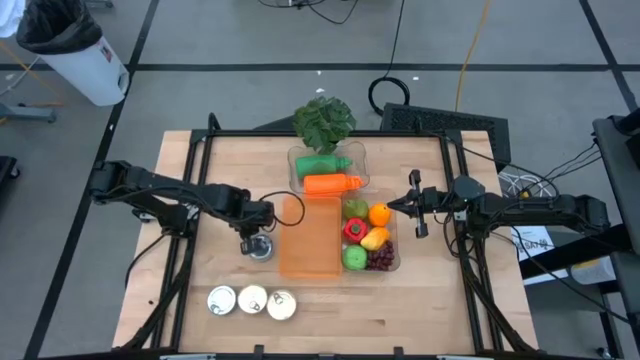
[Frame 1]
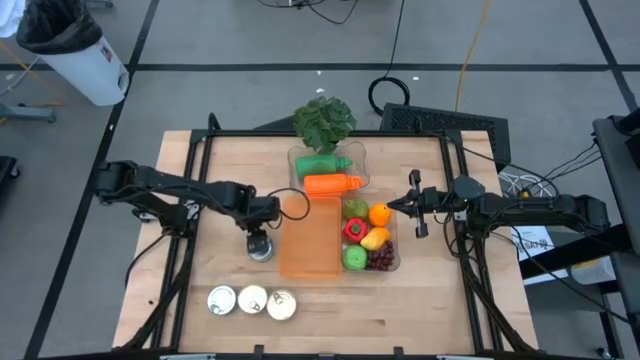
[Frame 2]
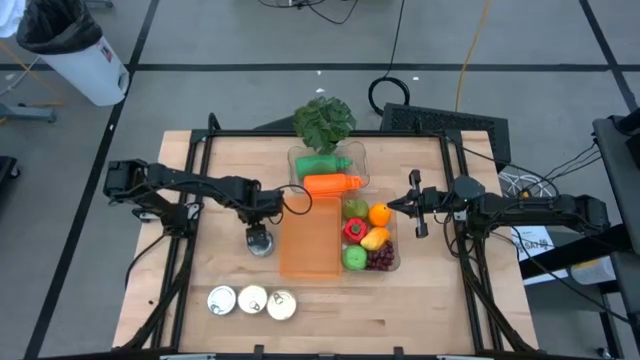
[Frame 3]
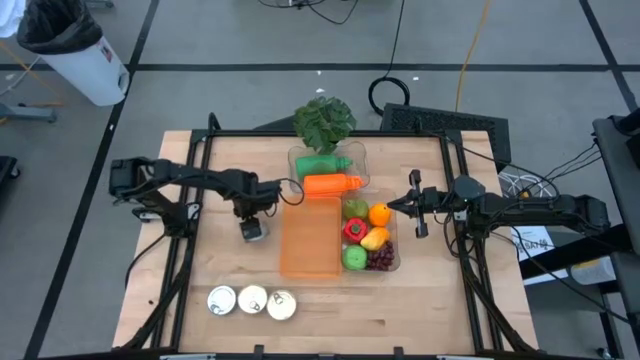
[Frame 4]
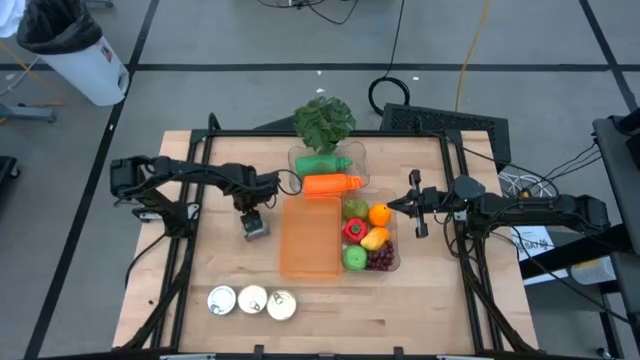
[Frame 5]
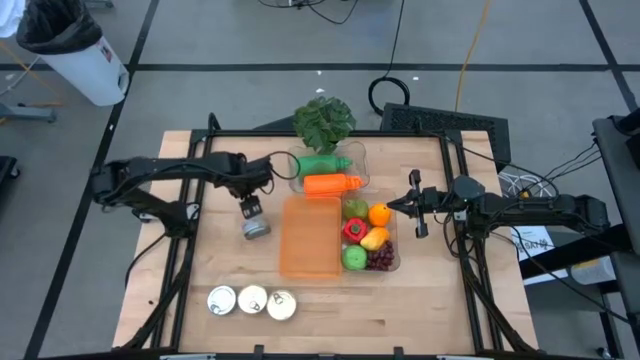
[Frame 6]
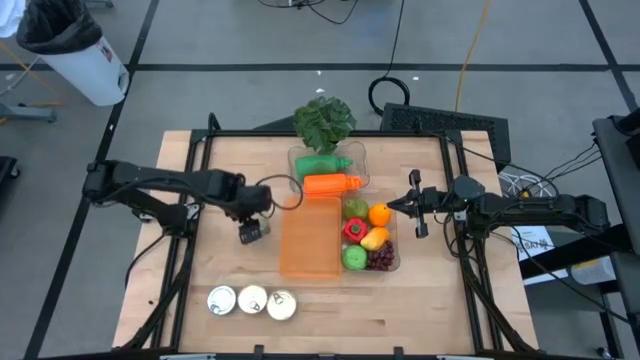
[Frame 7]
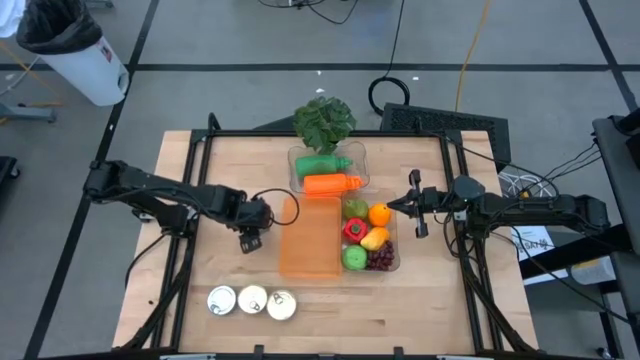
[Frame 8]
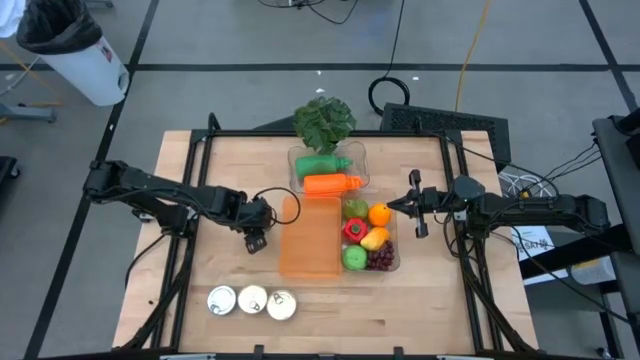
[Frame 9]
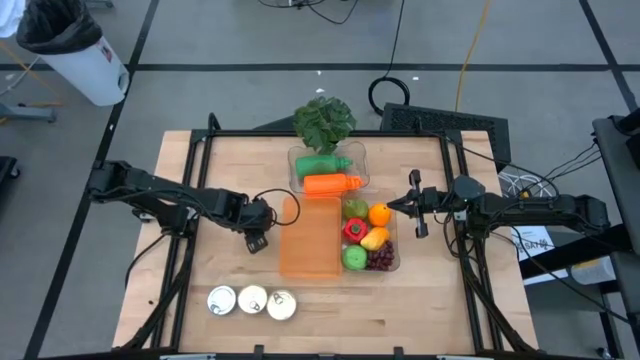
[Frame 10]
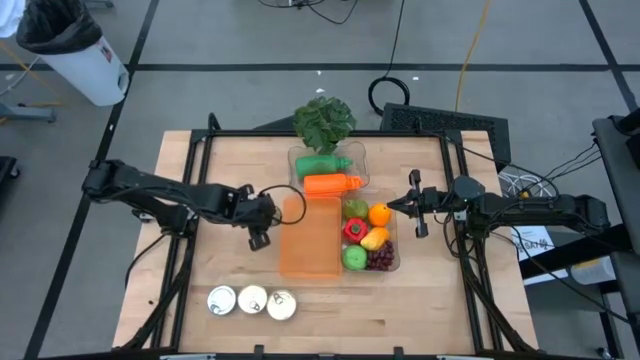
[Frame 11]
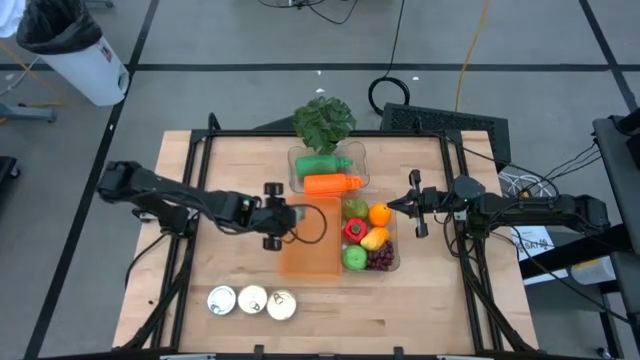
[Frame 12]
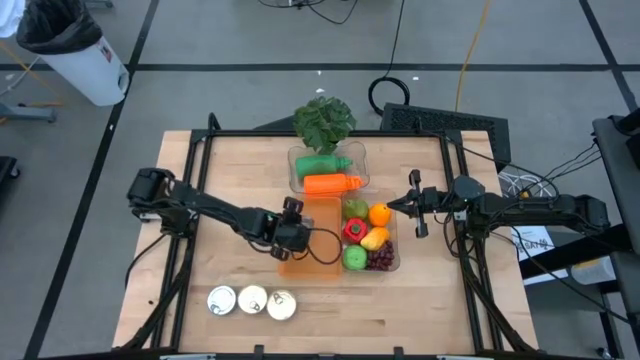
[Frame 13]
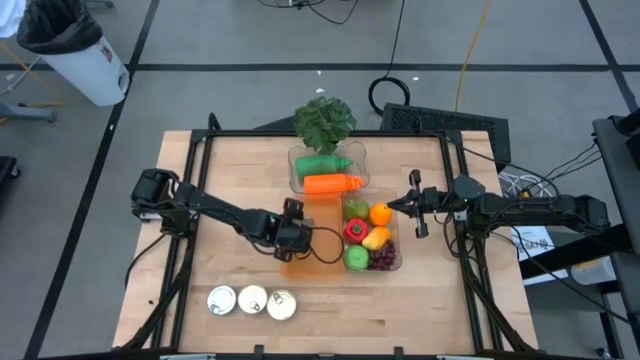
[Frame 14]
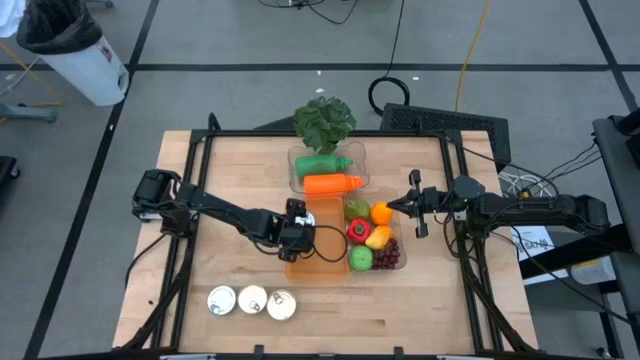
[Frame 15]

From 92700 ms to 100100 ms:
Task: Pick & Place Food Item
Put the top green tuna can into the orange bin

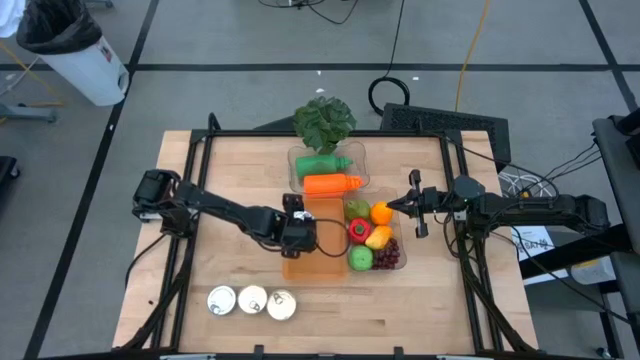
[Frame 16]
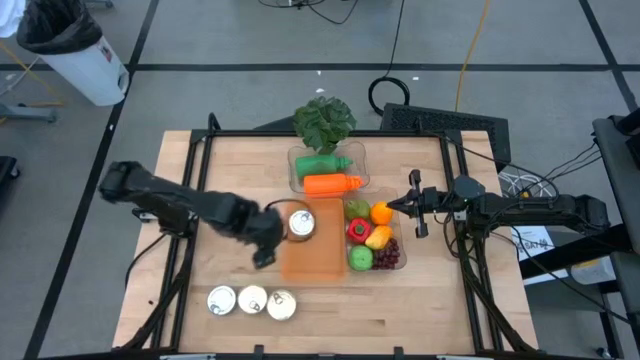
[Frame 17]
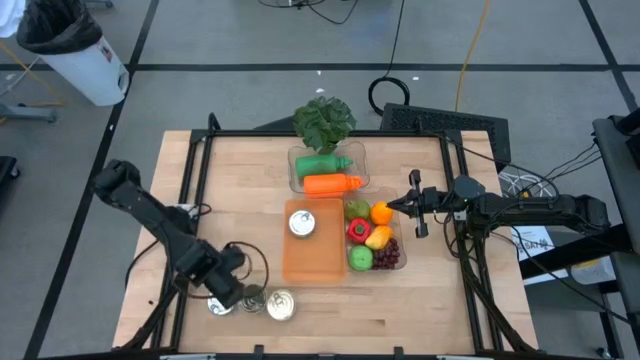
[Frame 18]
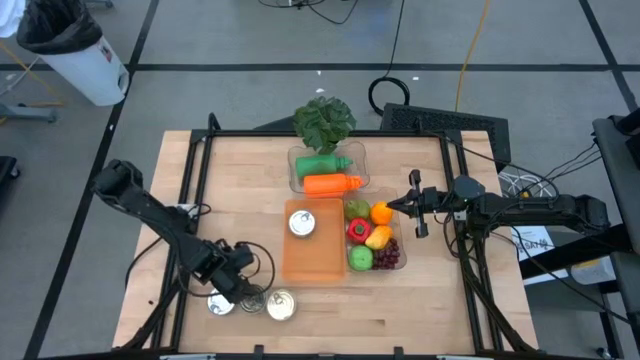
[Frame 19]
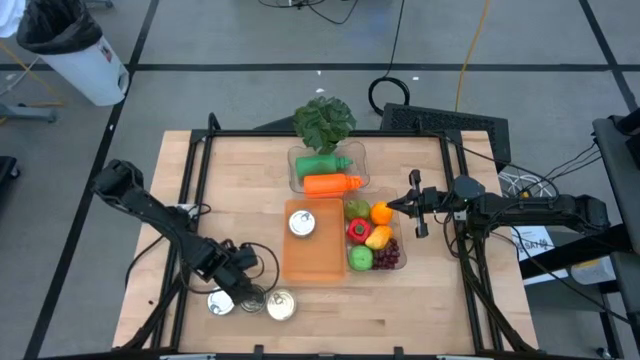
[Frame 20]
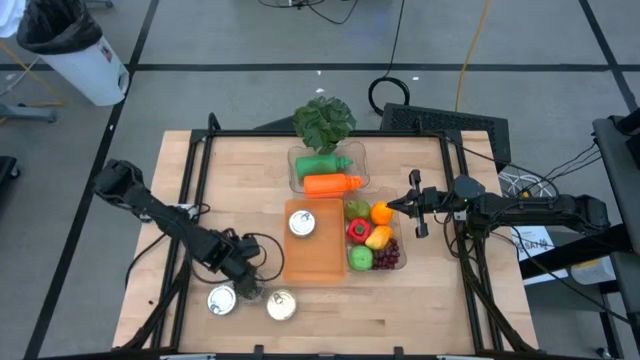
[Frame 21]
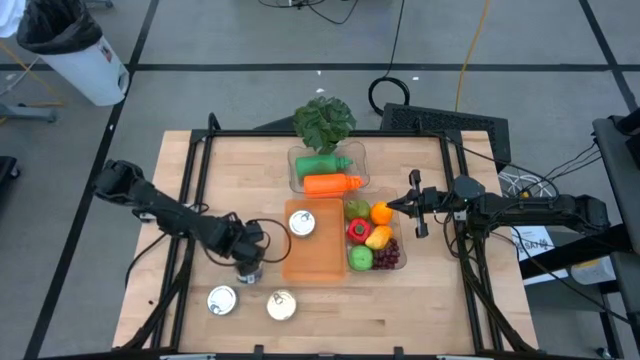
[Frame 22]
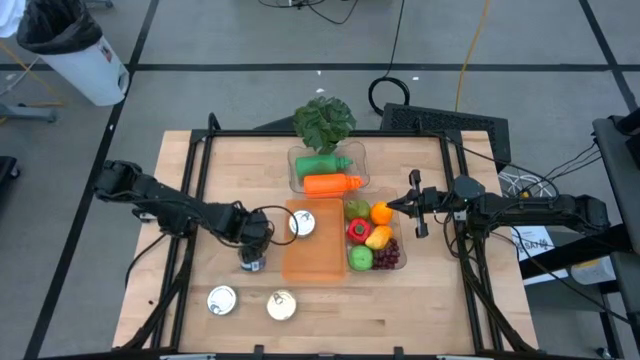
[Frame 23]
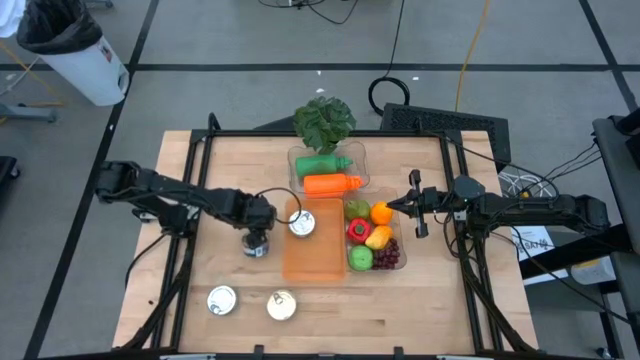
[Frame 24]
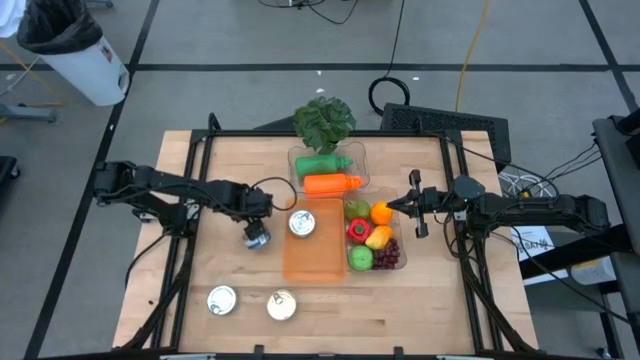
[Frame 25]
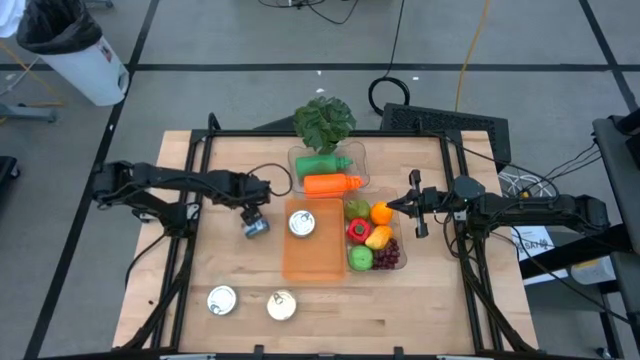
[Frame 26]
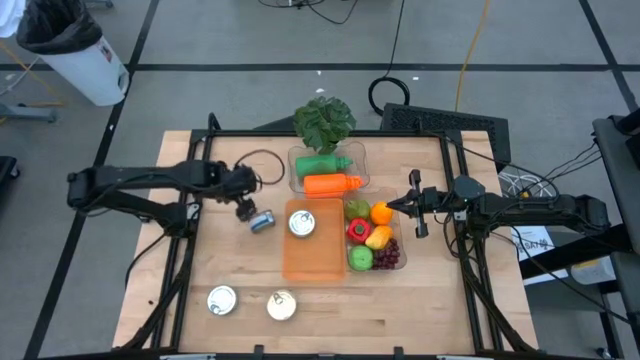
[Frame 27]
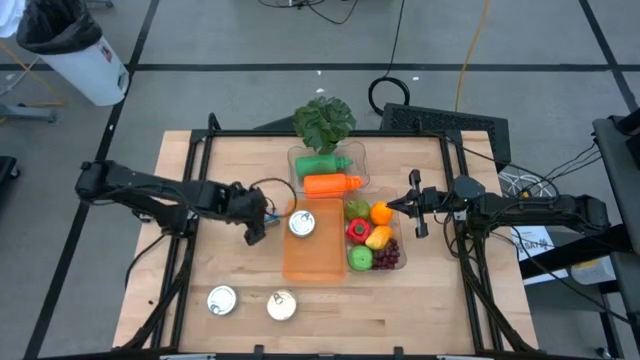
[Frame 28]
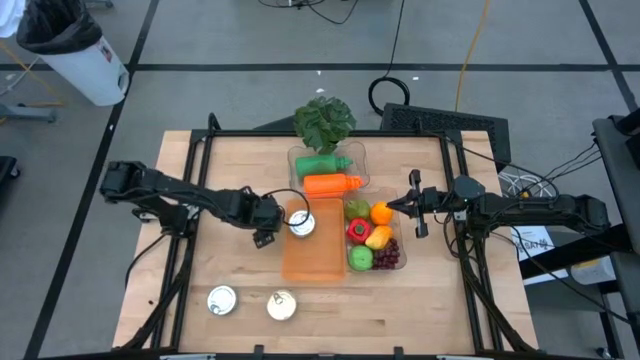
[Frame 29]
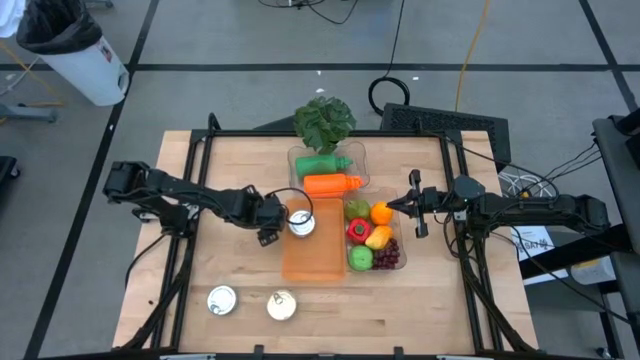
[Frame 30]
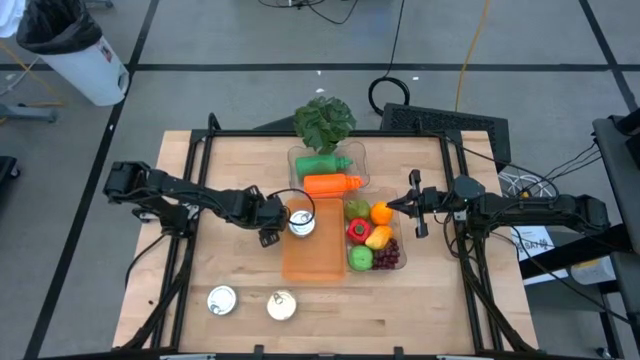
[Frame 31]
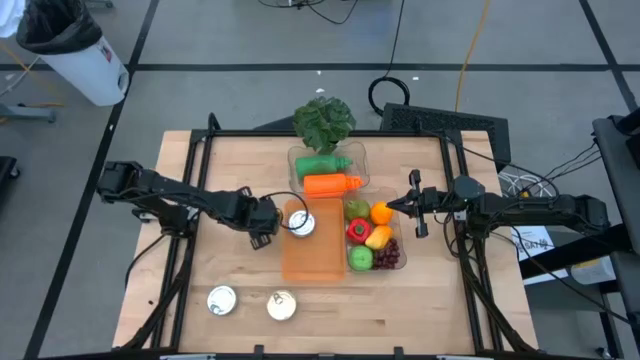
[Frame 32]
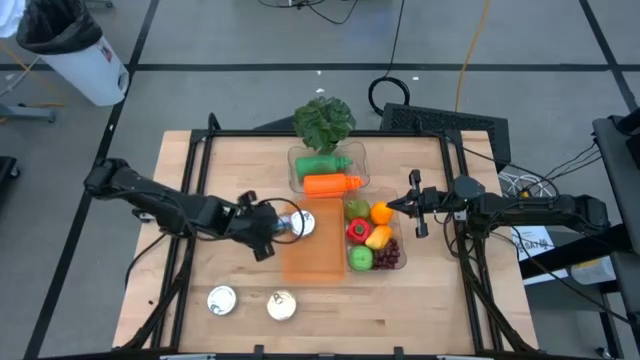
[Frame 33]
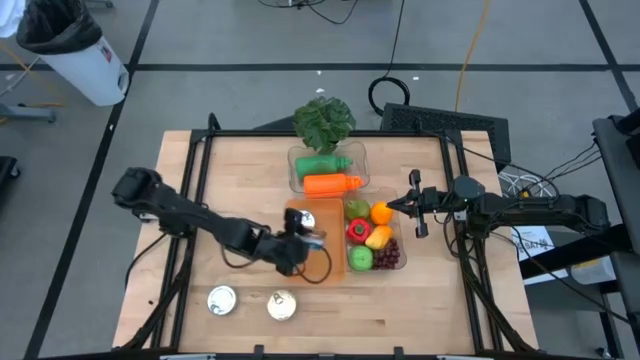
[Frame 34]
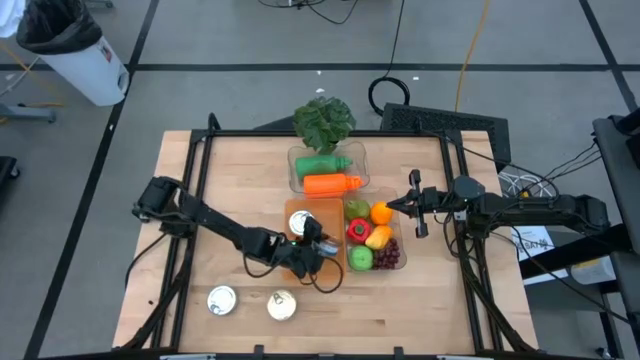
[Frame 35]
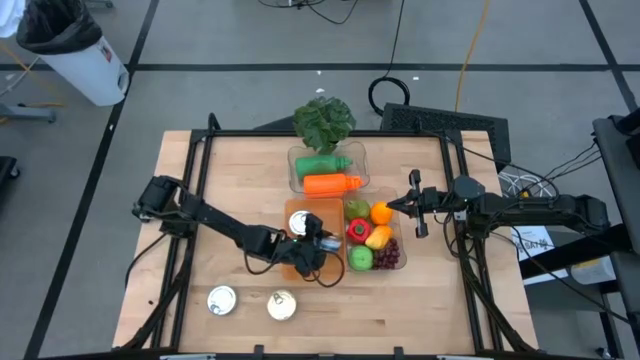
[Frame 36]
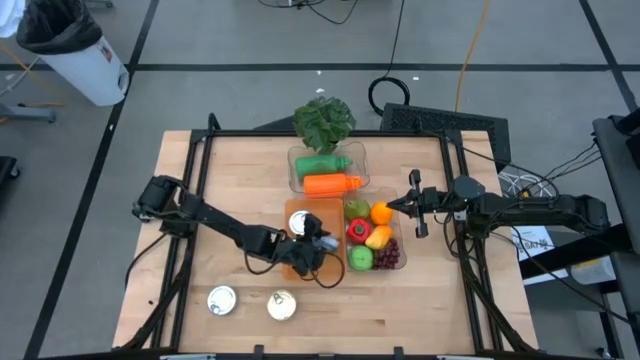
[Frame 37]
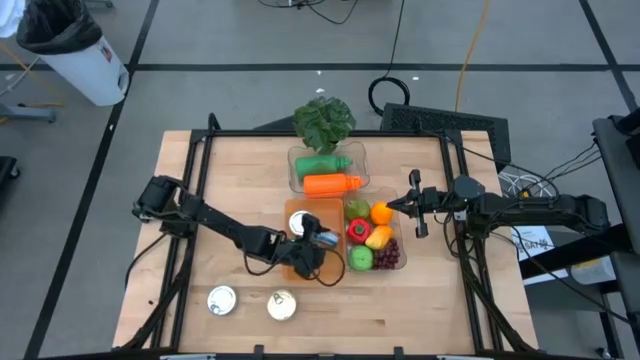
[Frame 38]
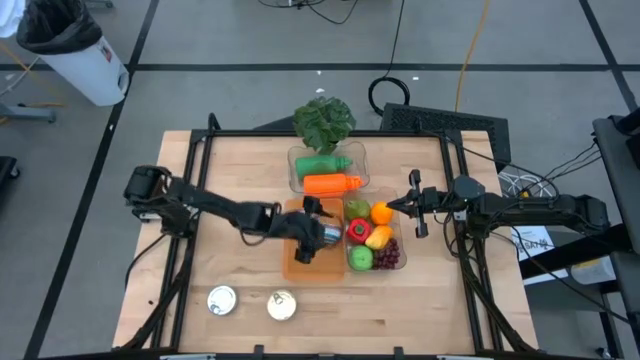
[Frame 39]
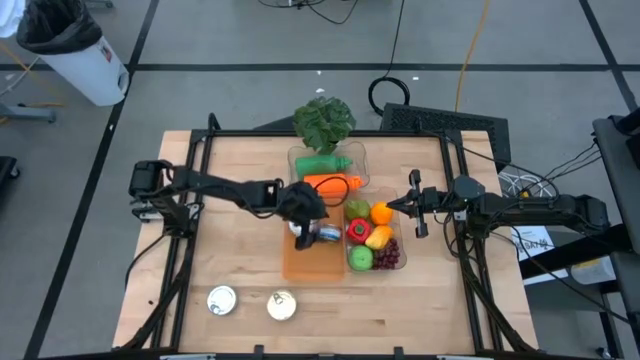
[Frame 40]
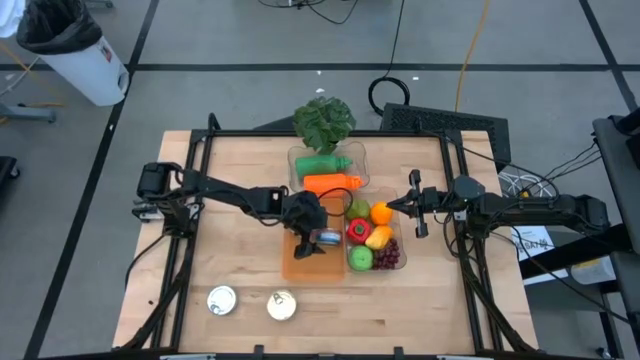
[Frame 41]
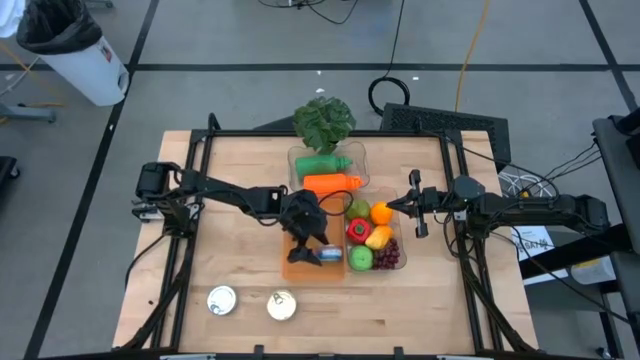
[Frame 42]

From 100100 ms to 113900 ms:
Put the left blue pink tuna can into the orange bin
